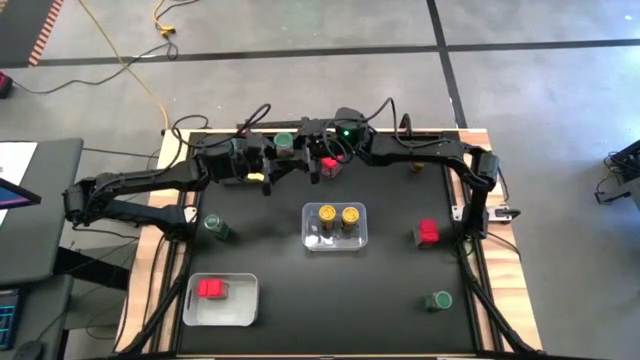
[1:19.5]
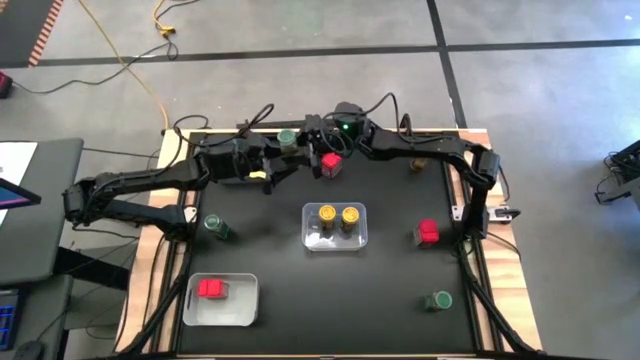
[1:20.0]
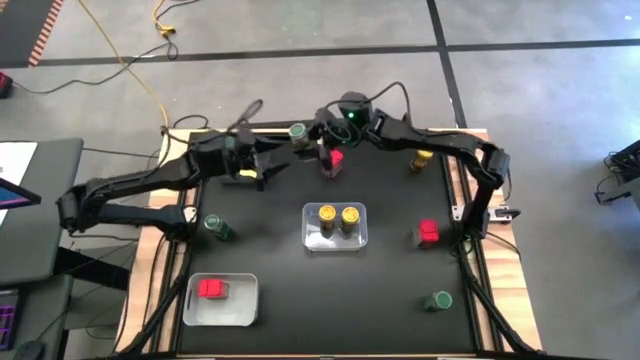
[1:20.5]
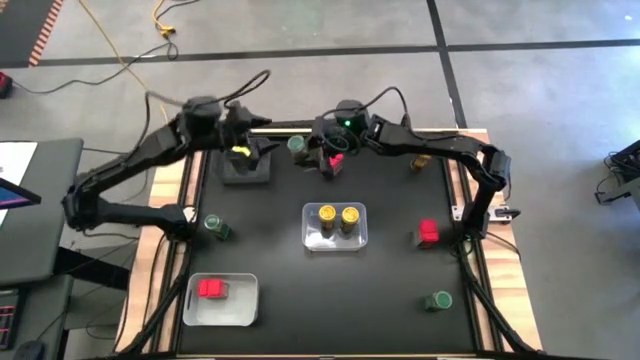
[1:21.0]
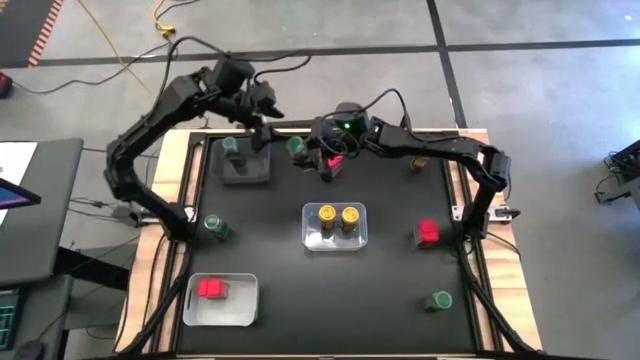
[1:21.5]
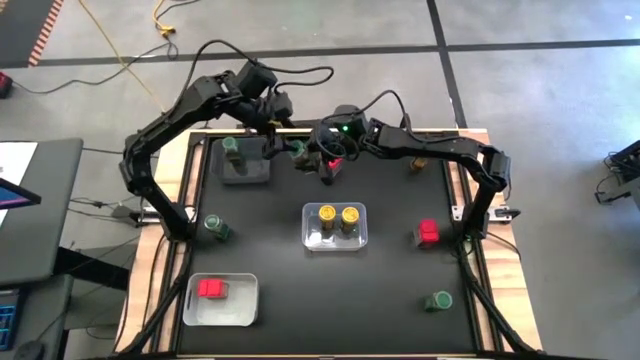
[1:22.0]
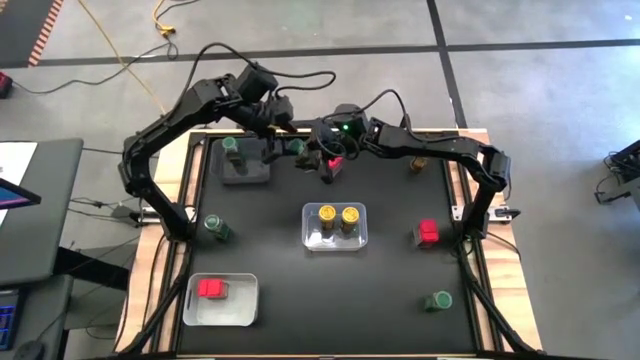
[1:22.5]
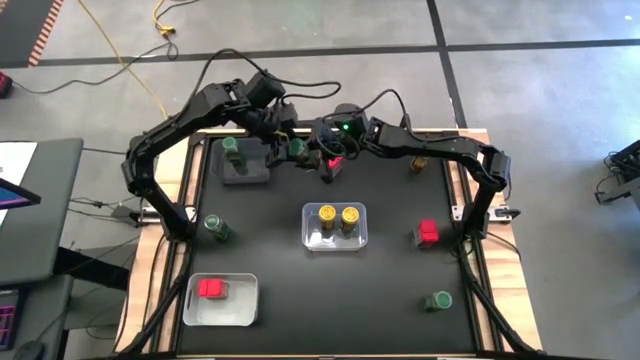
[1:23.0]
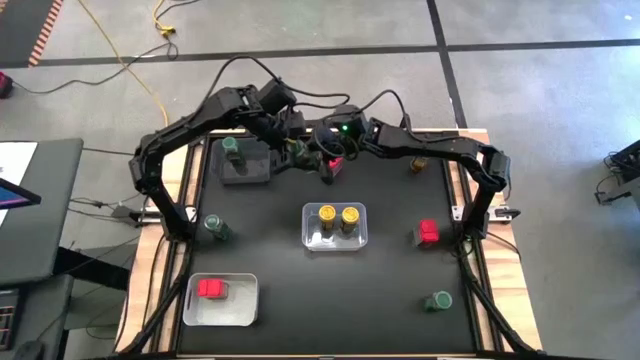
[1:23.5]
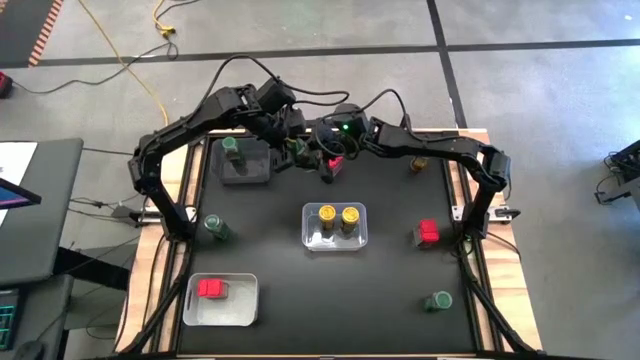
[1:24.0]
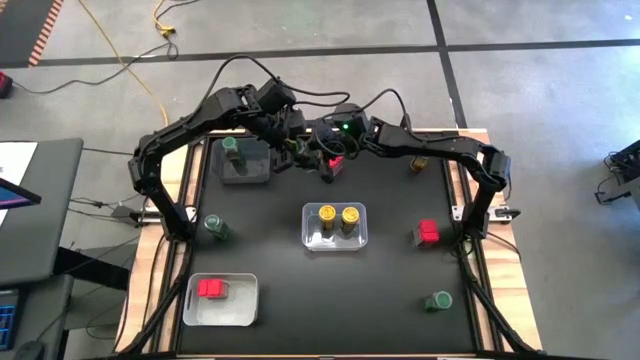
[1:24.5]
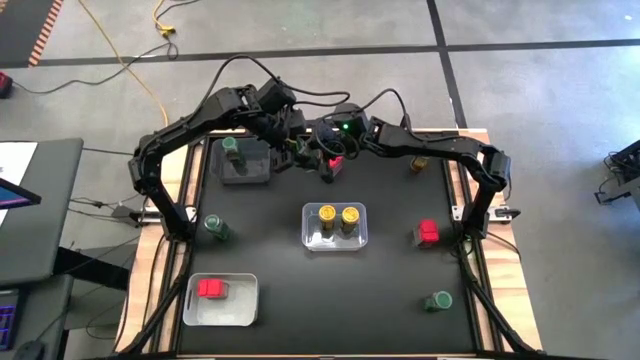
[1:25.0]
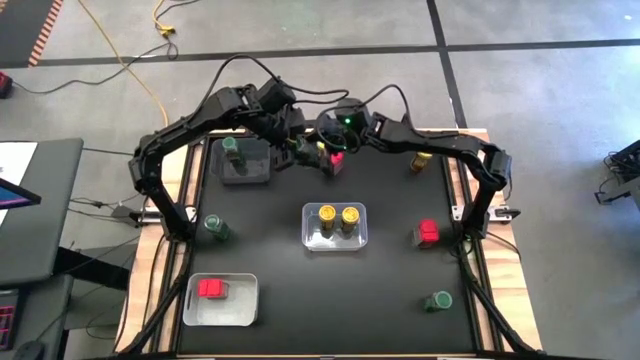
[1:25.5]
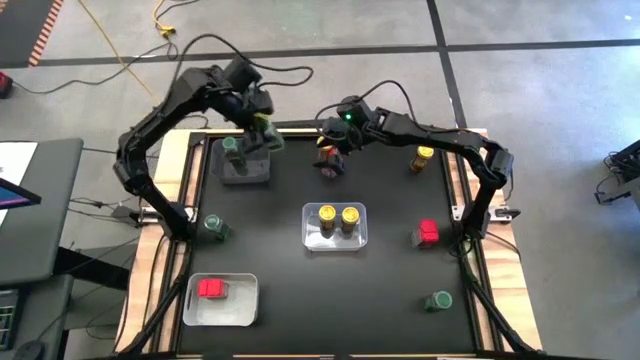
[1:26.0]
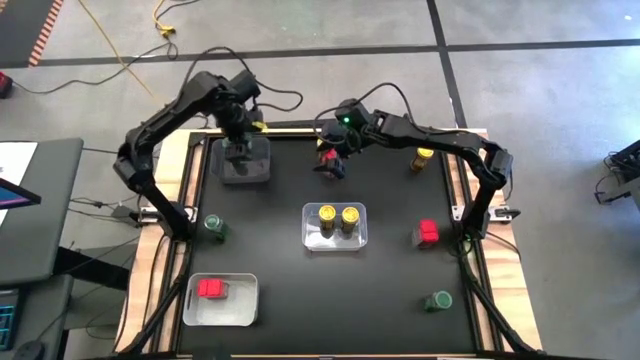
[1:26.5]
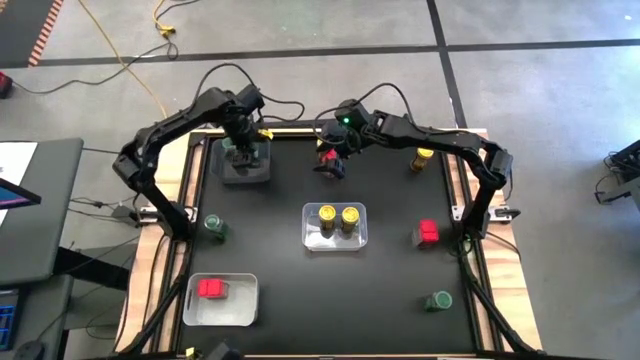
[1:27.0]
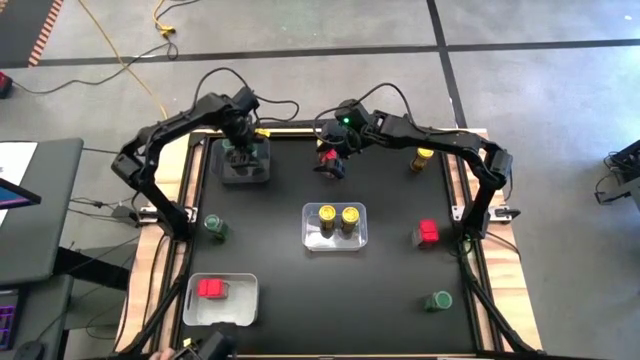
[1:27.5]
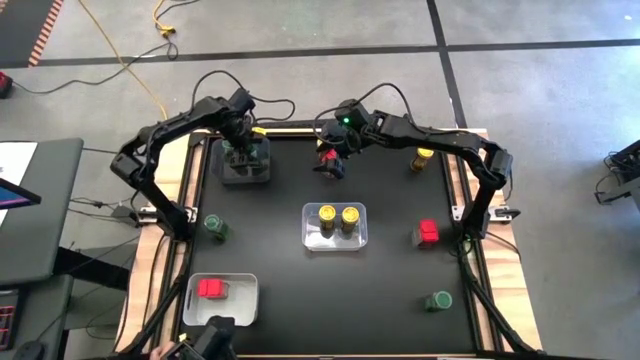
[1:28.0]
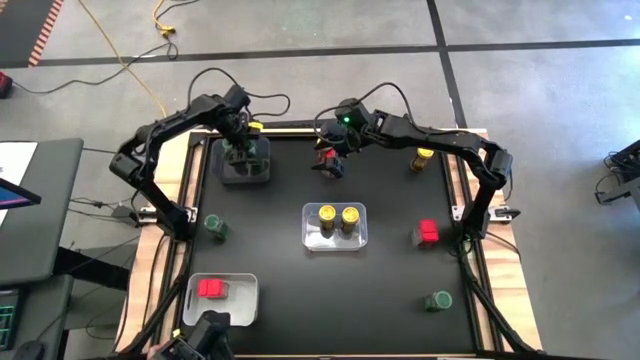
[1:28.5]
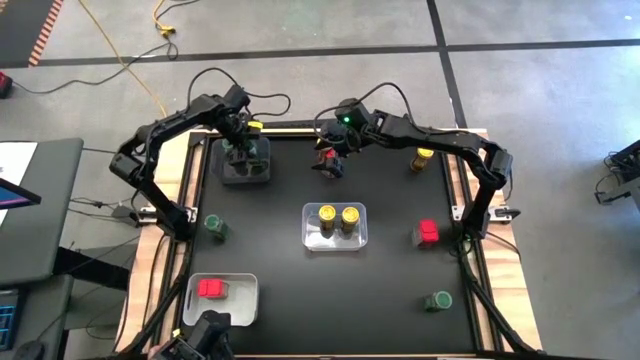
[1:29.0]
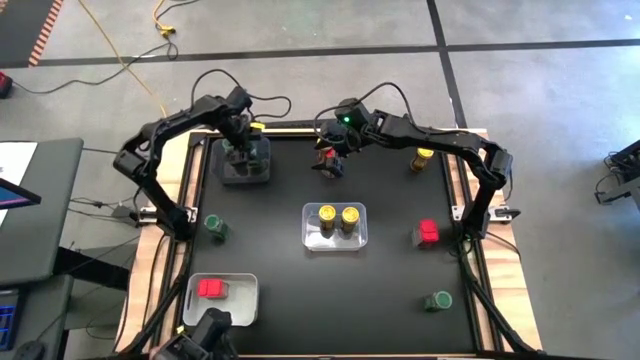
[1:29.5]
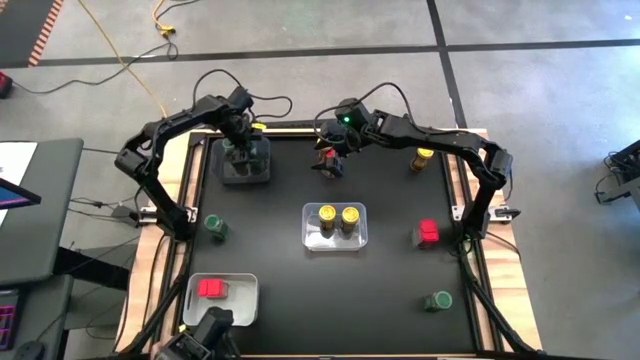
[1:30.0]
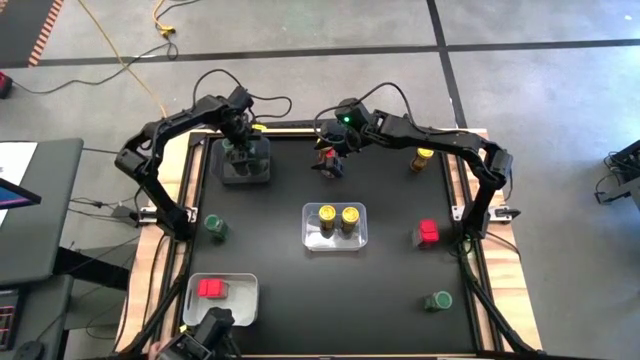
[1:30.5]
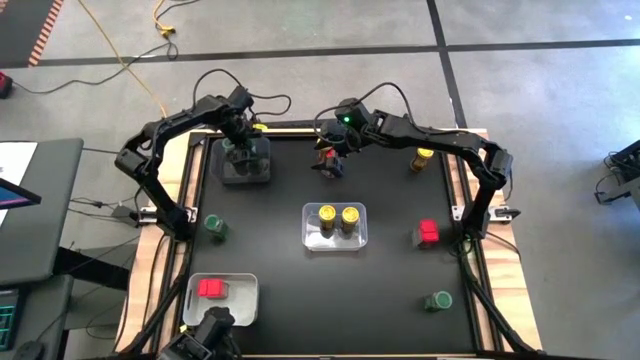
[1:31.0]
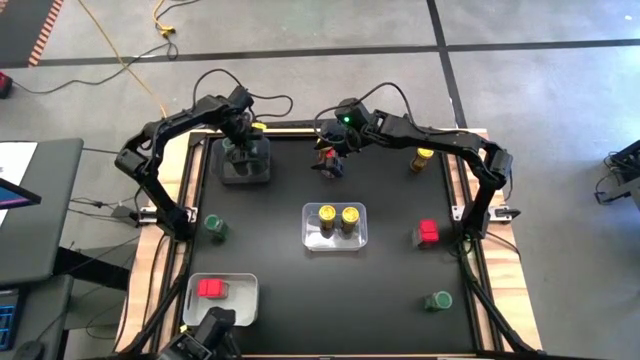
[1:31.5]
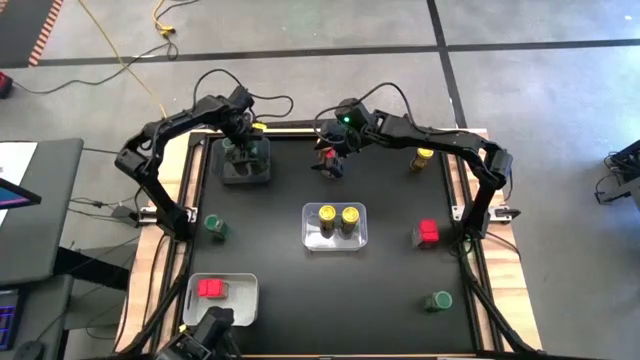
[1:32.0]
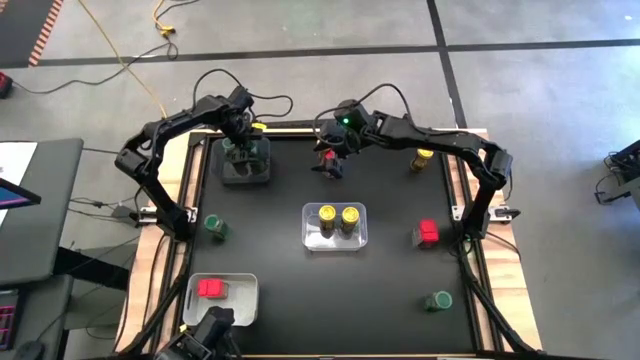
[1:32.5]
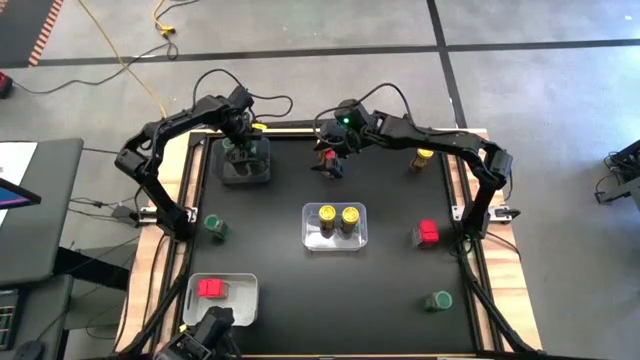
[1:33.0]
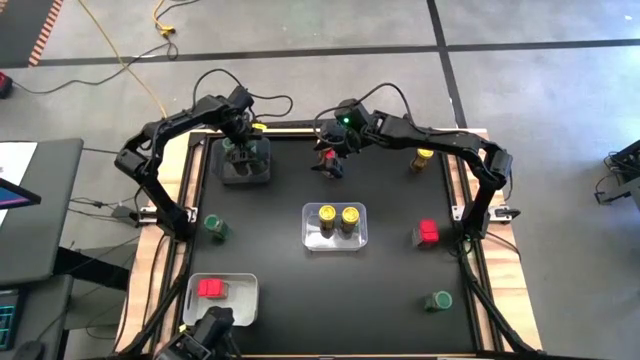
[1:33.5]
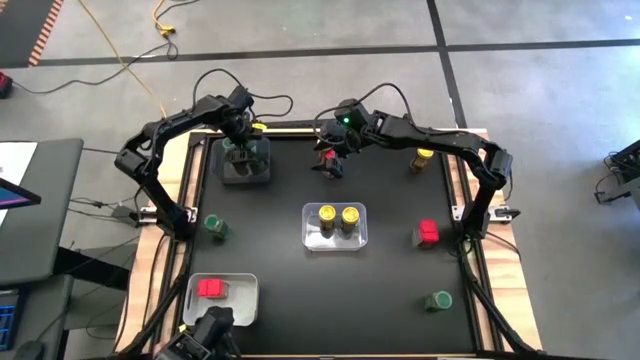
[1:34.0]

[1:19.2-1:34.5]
Task: Sort spices by type
Put the green seasoning bottle into the black bin

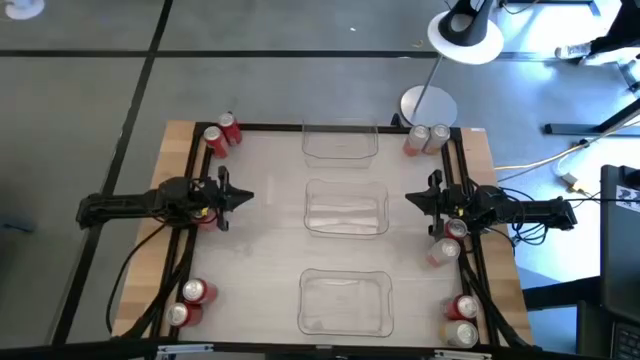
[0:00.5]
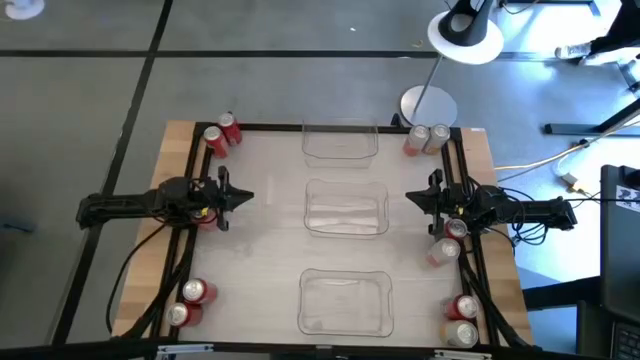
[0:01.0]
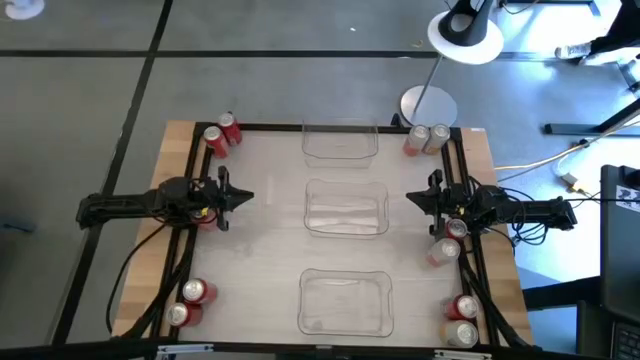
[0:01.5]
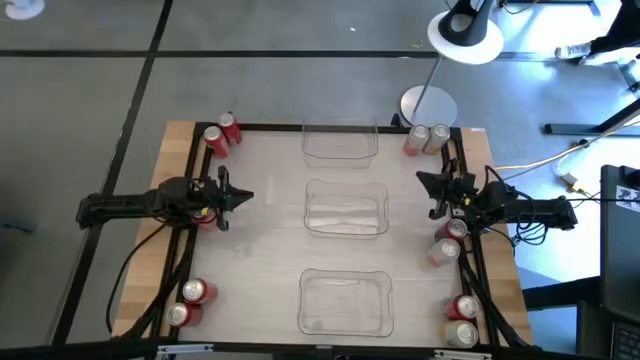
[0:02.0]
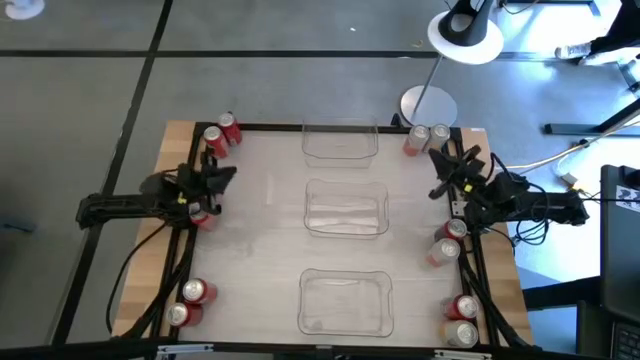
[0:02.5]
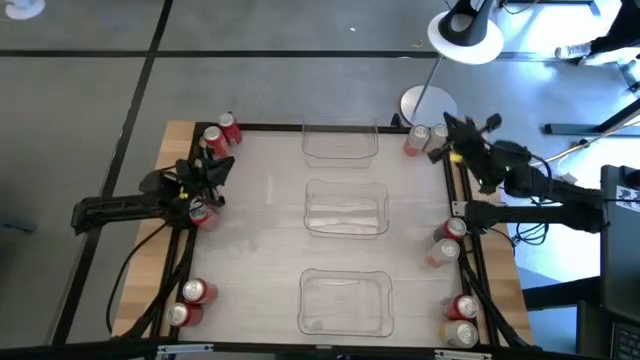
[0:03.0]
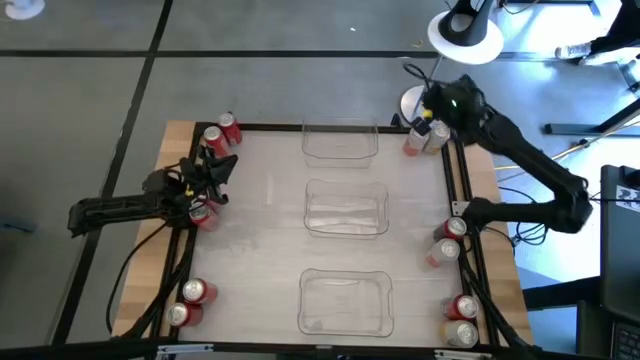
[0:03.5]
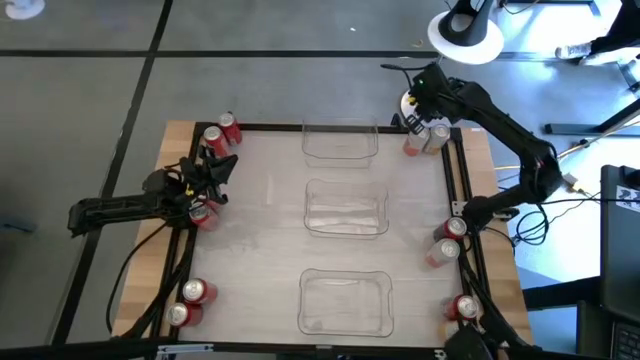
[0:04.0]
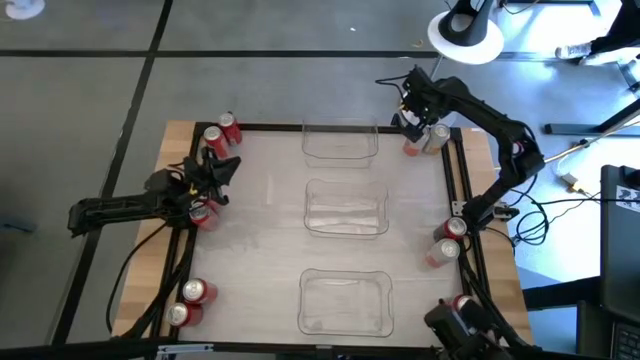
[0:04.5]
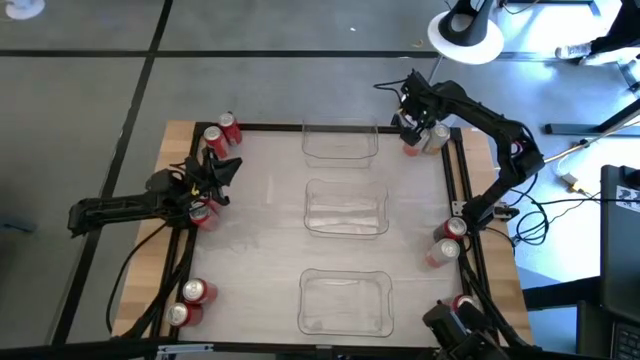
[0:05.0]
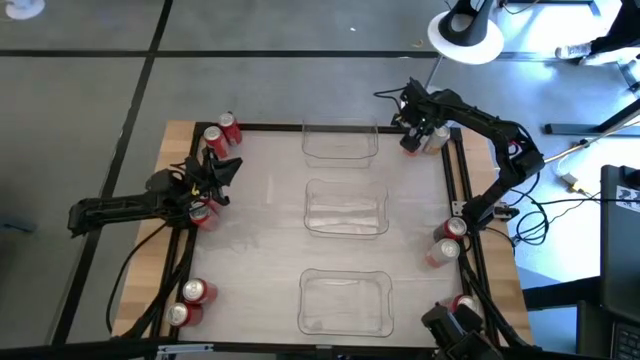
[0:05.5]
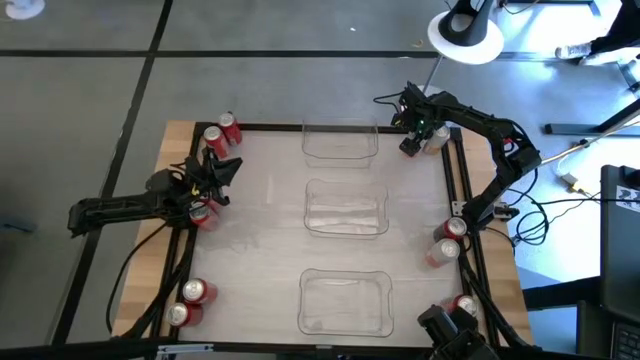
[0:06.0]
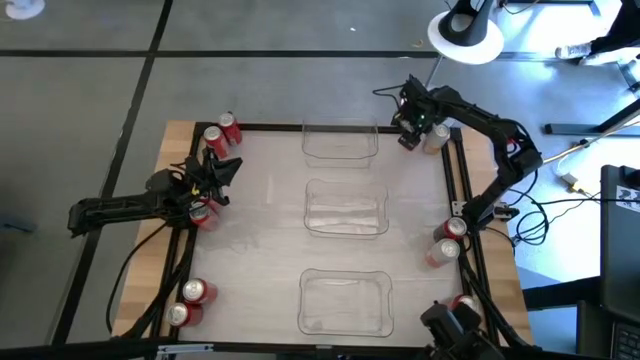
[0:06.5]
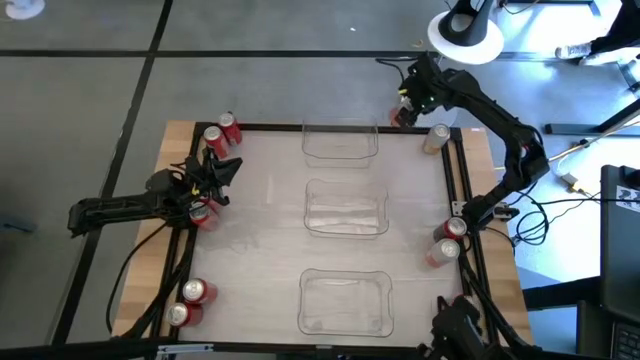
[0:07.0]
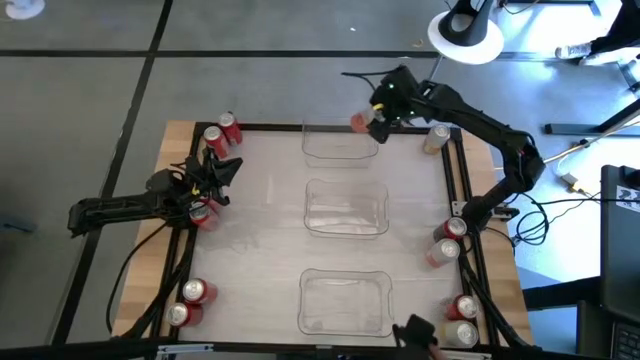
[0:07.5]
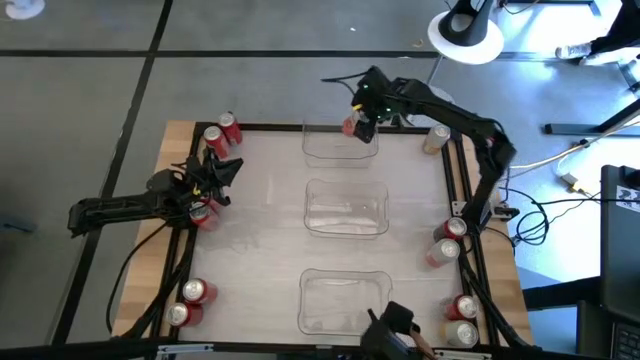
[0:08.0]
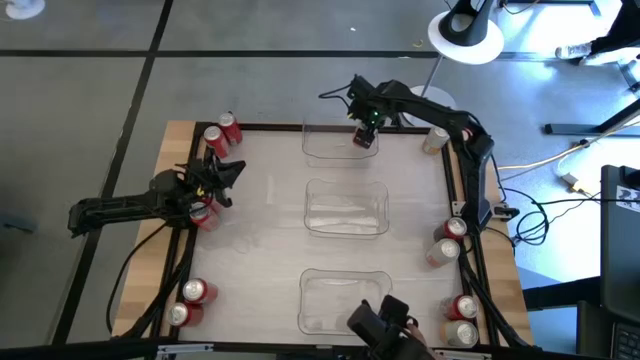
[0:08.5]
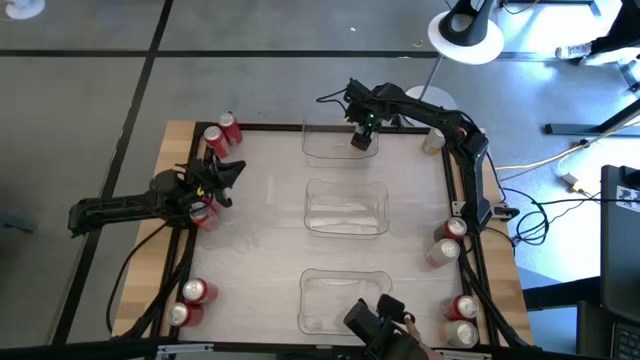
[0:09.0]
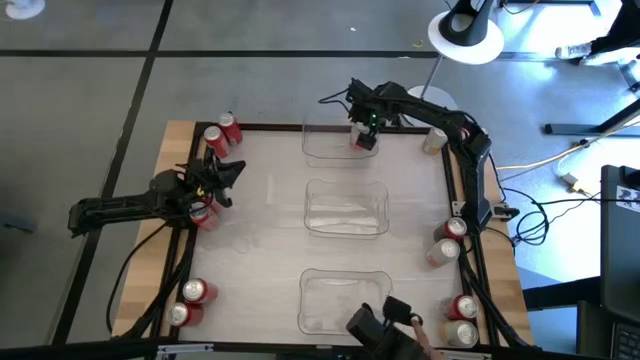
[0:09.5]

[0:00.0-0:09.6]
Task: Sort soda cans
Put the top orange white soda can into the top transparent bin
